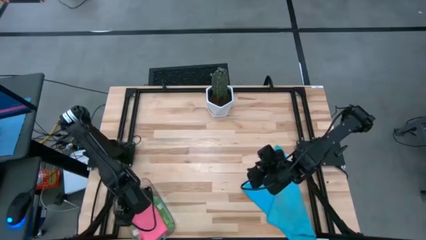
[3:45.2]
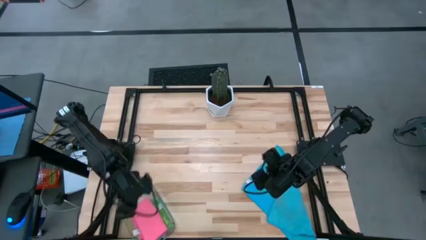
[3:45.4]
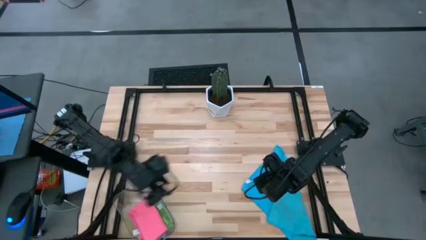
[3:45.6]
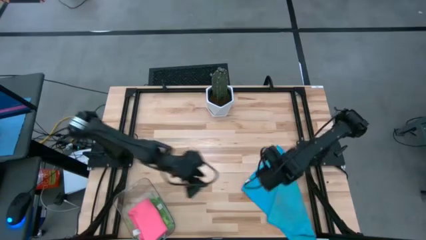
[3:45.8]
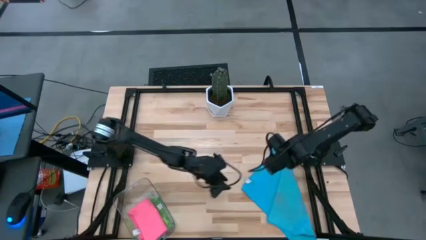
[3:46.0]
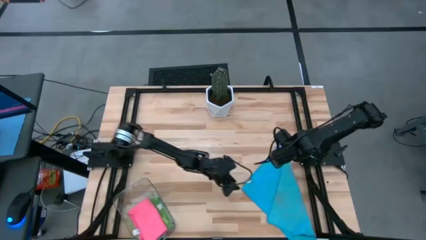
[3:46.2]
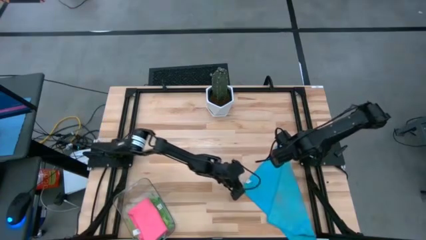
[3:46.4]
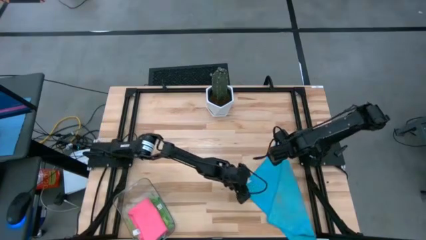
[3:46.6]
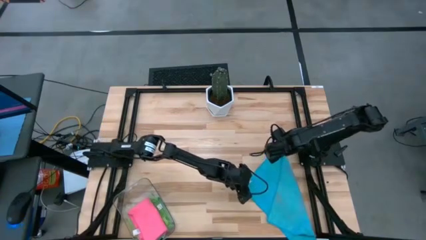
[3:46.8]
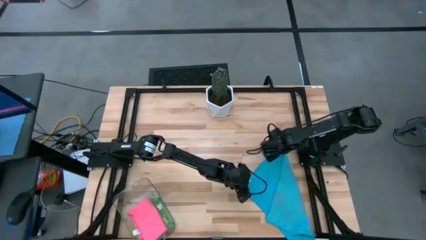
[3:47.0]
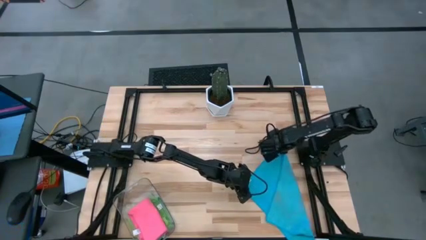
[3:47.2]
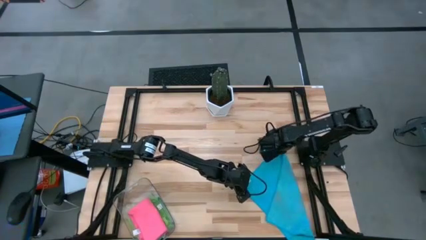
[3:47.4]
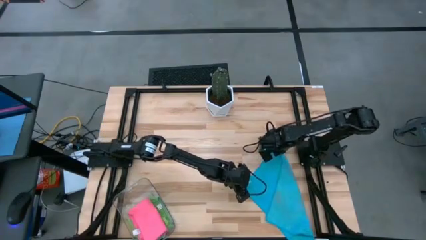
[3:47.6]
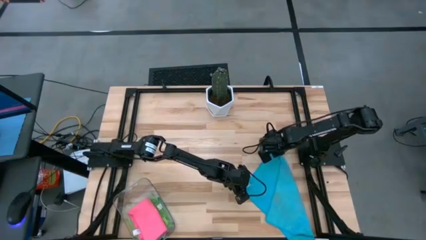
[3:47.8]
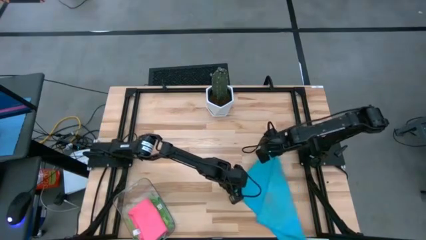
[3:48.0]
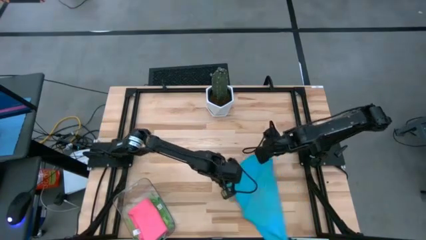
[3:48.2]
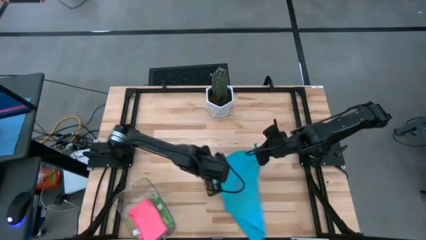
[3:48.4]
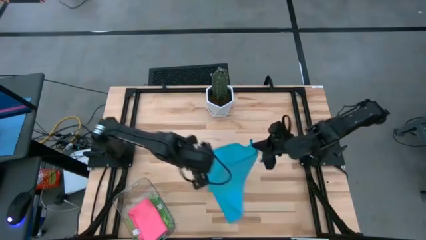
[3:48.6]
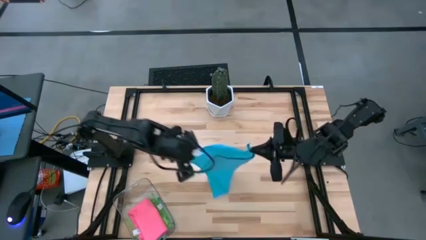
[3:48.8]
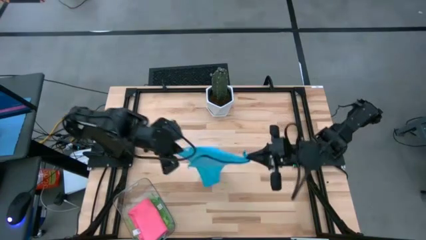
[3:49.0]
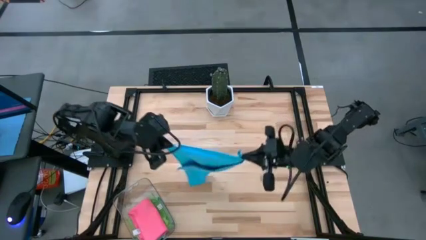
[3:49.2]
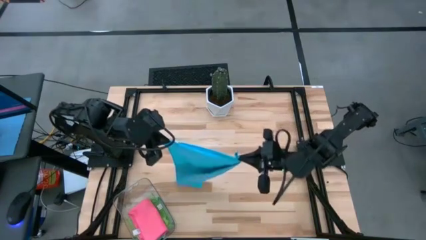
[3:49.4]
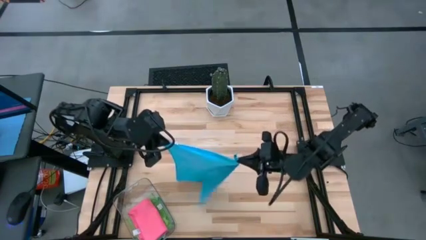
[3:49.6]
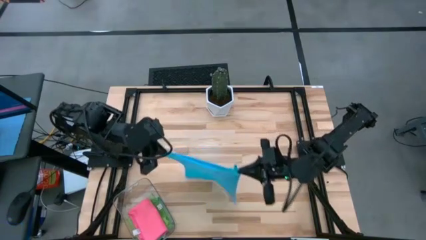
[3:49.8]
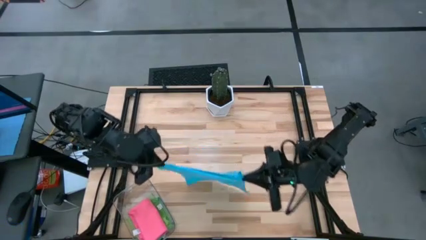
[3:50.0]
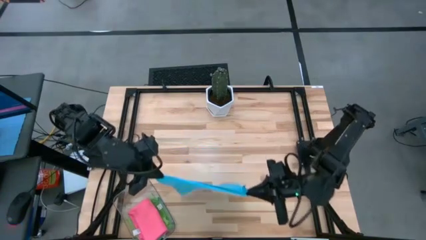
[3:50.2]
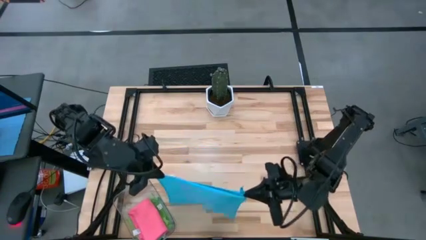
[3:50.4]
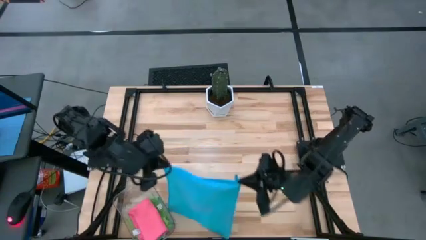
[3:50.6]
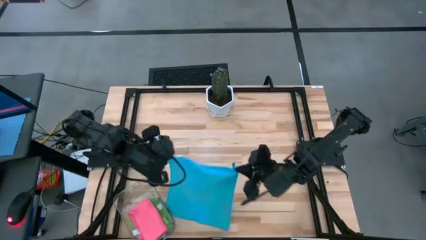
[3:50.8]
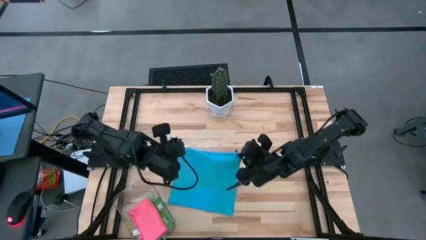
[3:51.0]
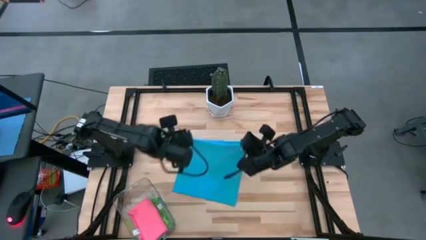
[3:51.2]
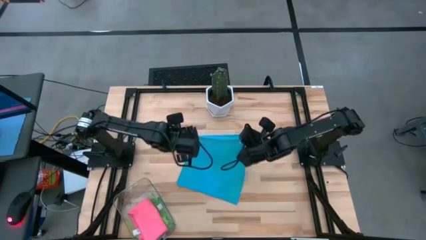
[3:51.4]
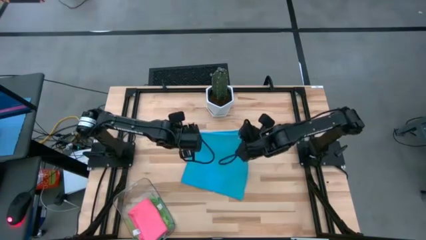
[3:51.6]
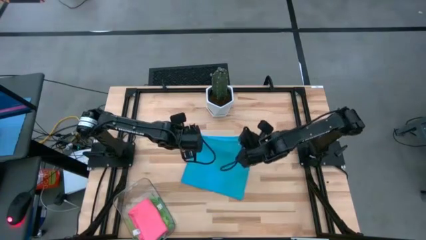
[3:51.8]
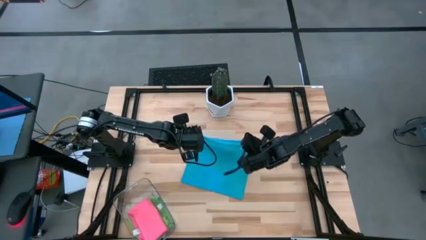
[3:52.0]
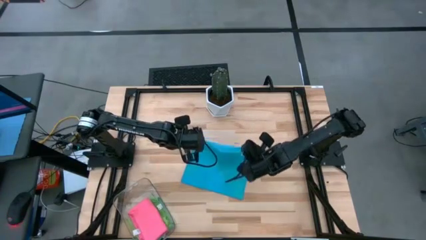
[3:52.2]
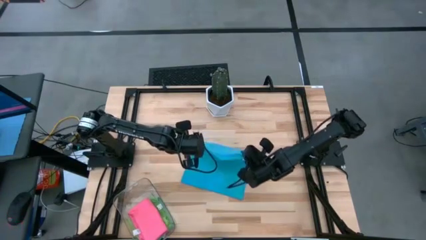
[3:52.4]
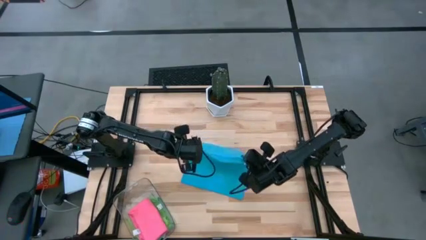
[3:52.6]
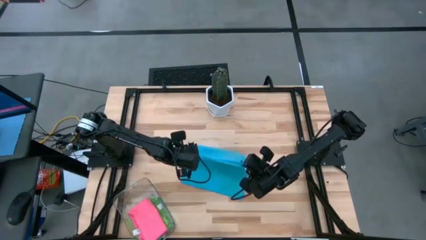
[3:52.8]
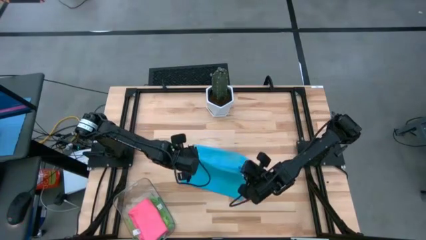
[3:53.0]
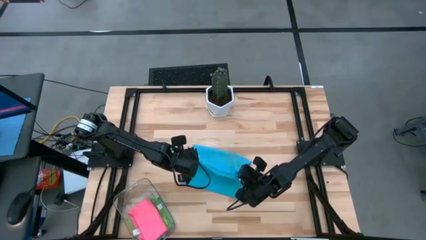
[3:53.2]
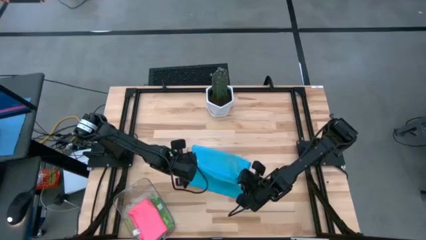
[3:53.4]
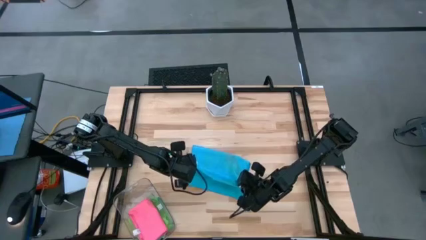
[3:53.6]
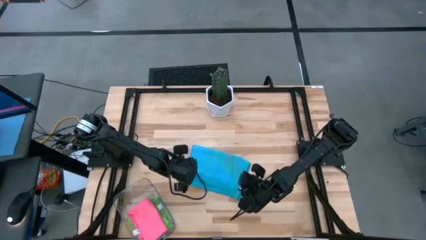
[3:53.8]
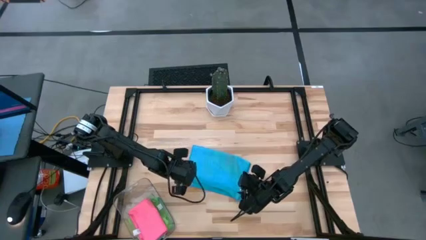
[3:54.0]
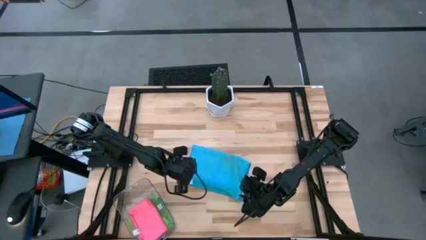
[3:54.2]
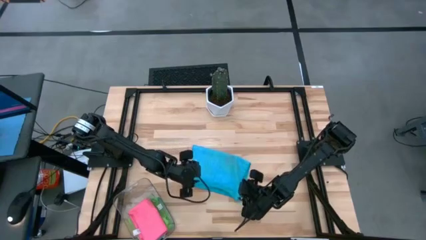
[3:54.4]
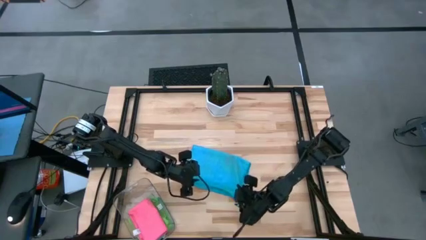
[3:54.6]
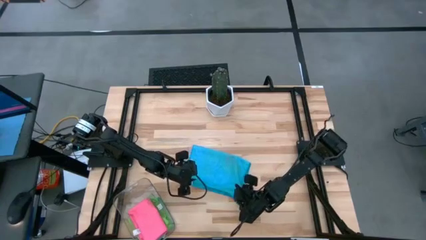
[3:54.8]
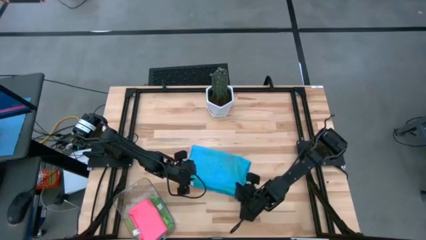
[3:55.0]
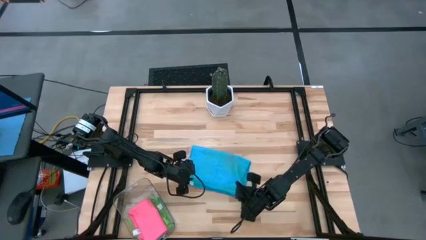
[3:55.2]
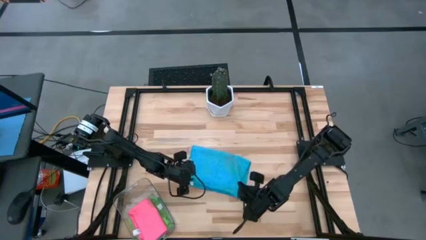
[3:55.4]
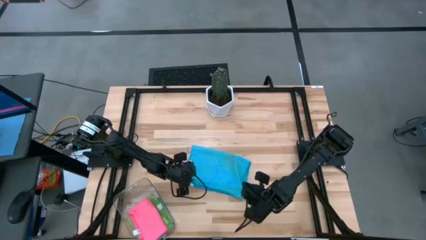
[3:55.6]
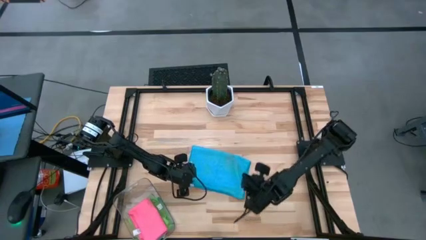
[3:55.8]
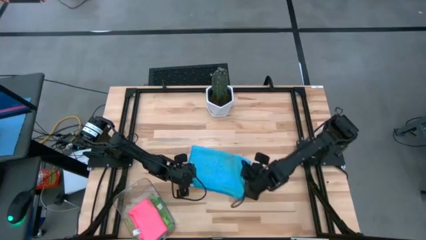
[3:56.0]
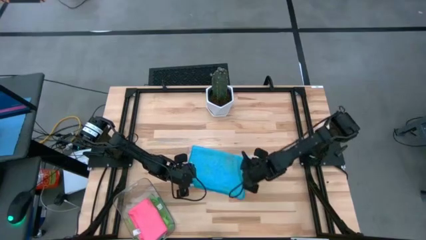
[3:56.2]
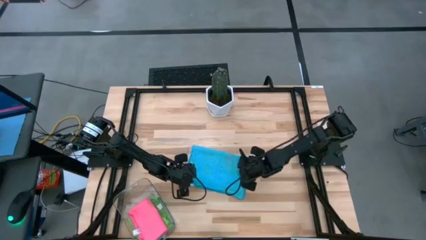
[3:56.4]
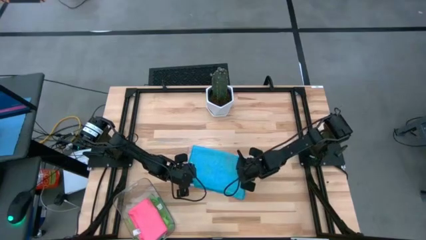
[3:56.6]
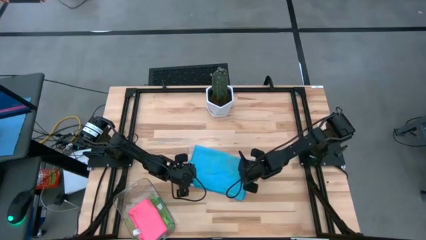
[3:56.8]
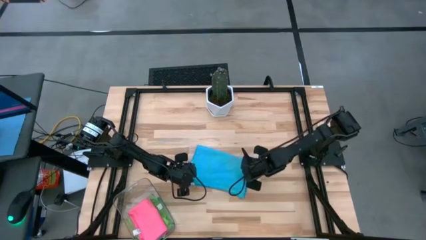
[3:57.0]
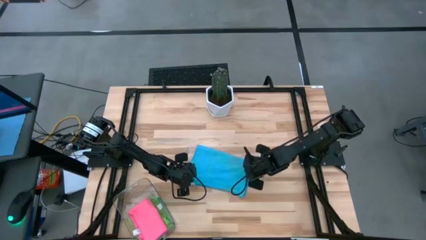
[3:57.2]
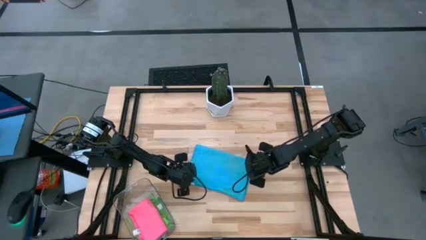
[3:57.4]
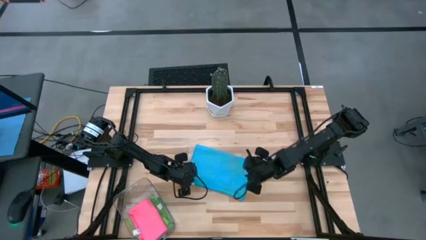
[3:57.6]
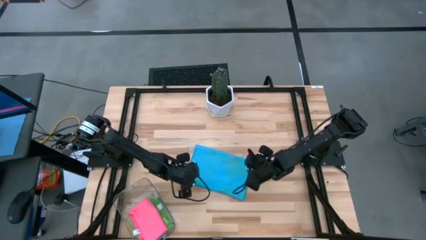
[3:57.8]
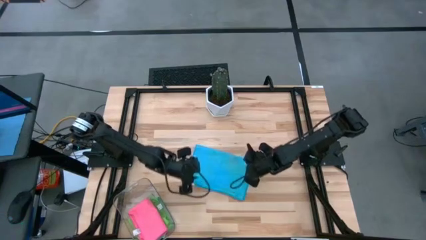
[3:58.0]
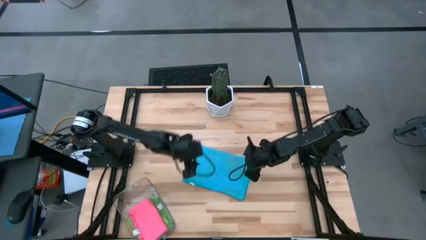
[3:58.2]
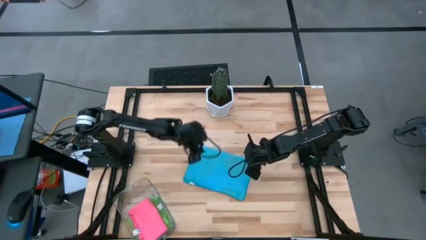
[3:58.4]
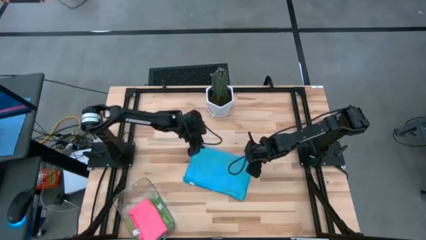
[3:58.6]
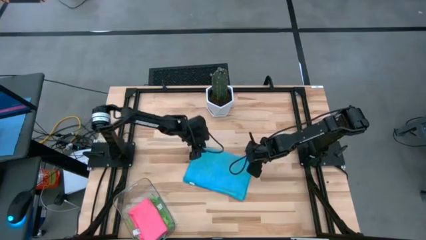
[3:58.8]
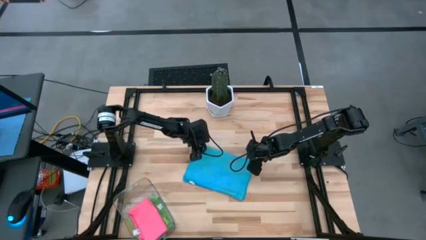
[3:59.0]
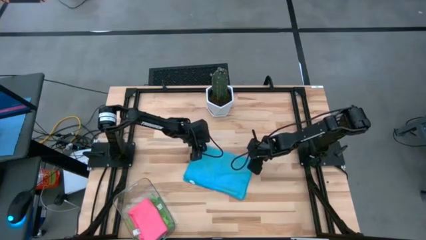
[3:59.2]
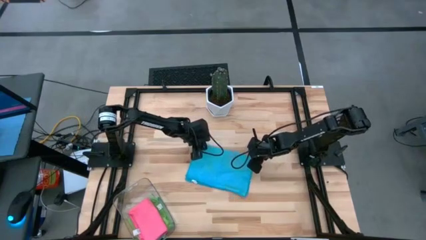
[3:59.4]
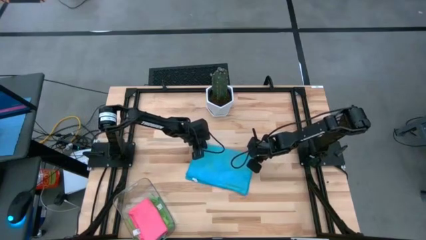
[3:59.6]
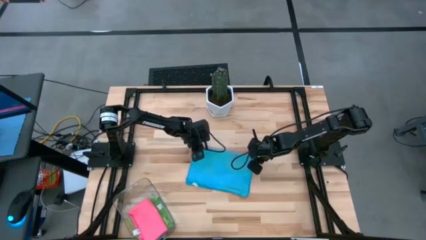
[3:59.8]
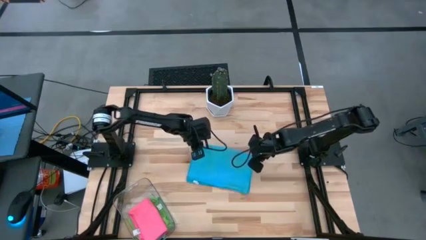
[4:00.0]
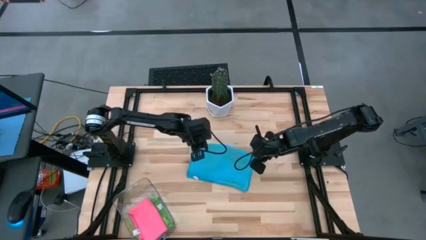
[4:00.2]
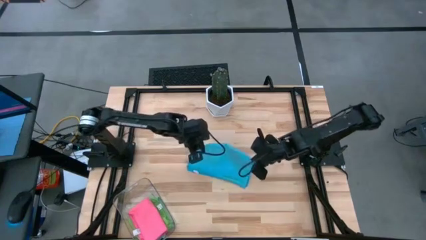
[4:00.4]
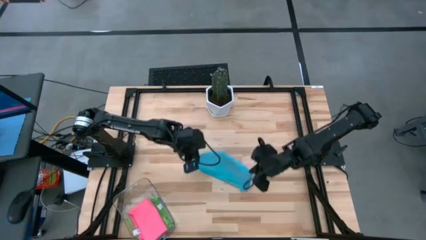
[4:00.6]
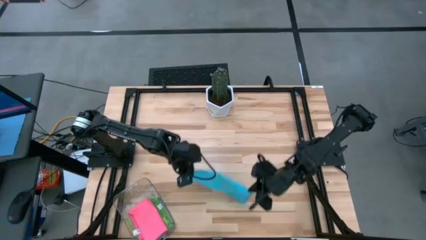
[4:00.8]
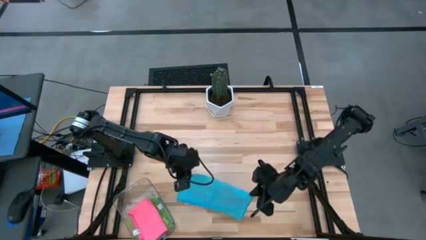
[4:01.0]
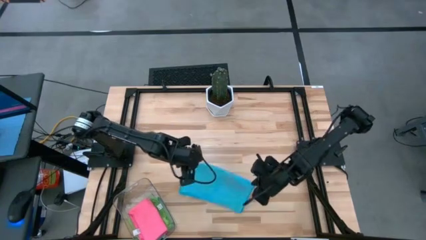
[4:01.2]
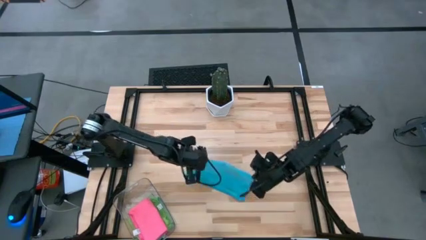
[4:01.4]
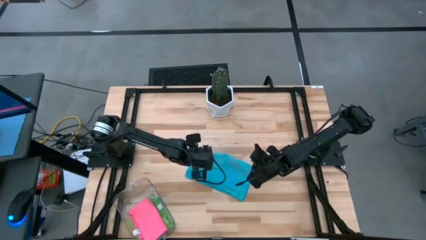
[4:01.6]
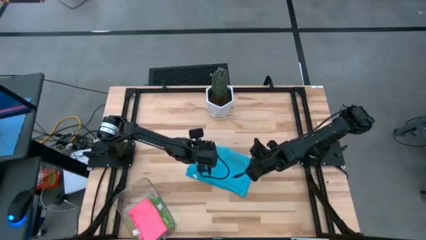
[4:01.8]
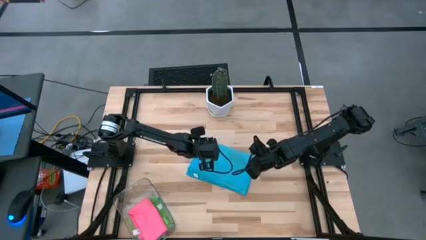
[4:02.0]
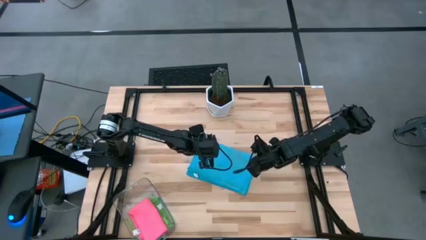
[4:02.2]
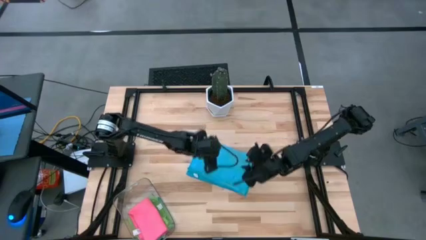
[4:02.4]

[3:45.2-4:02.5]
Task: Fold microfiber towels
Fold the blue microfiber towel

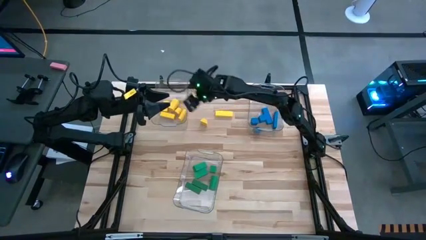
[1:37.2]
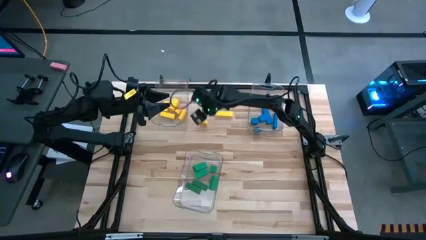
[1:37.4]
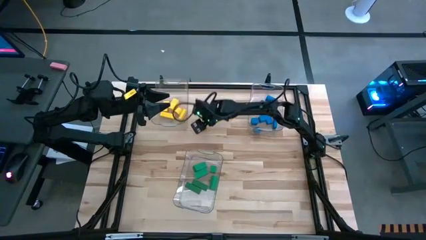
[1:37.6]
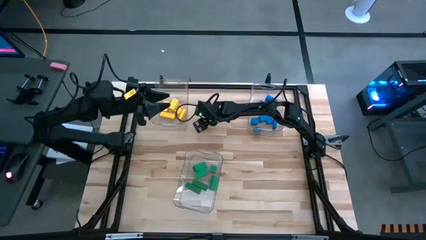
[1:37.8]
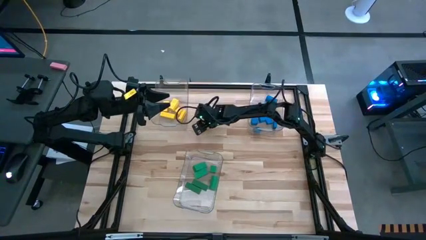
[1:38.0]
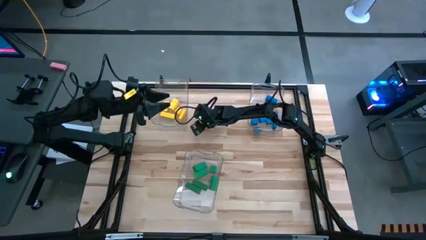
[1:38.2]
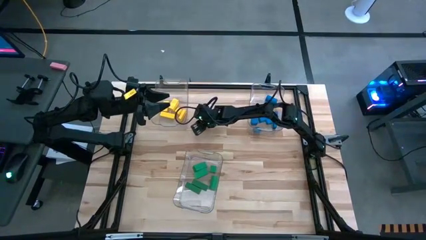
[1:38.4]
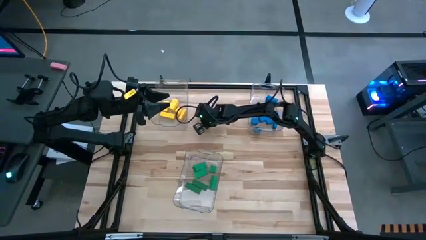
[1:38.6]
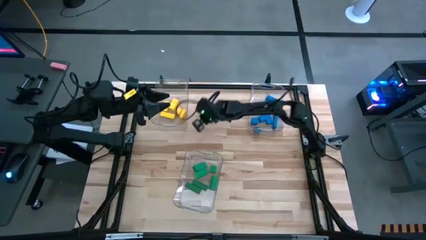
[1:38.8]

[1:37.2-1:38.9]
Task: Sort blocks
Put the yellow block into the top left transparent bin
